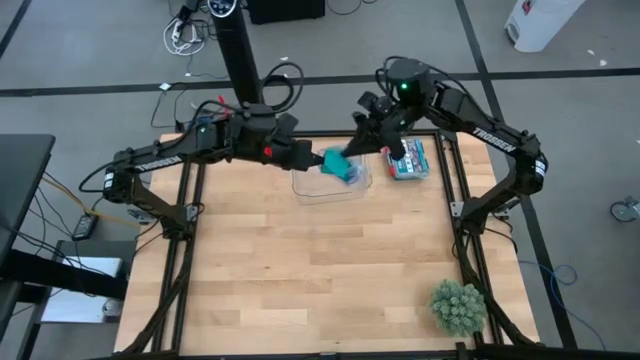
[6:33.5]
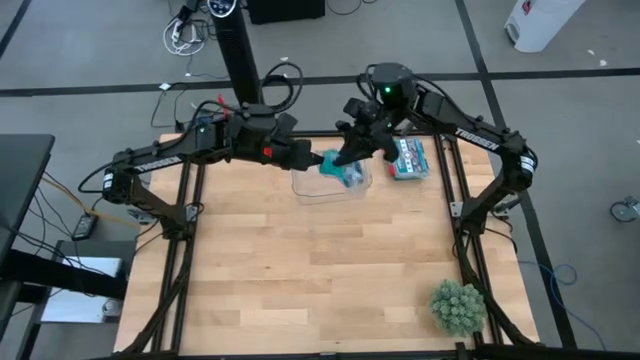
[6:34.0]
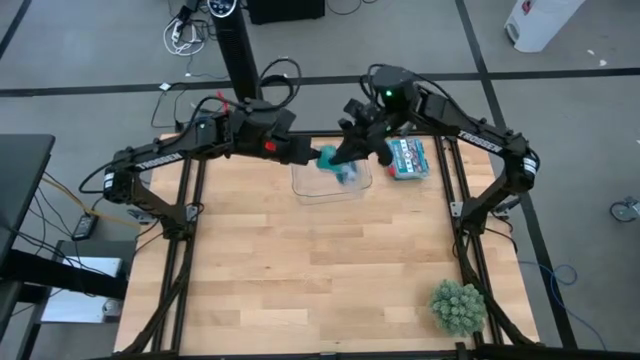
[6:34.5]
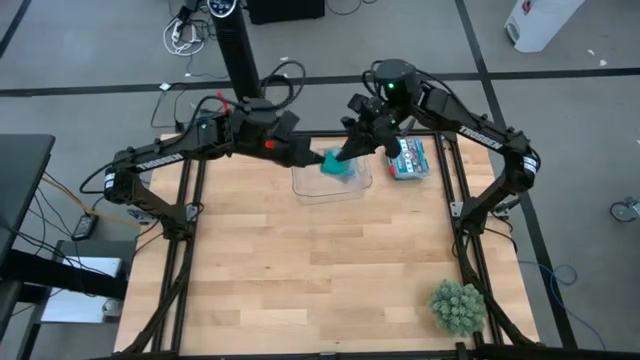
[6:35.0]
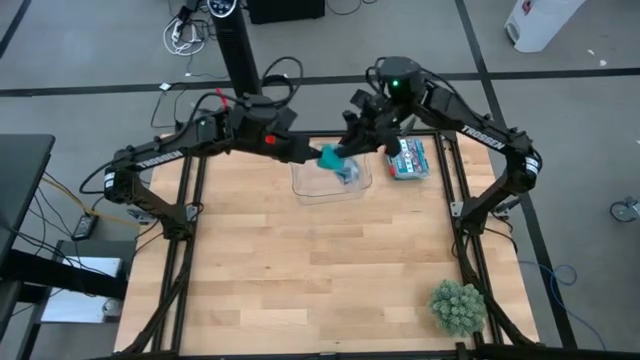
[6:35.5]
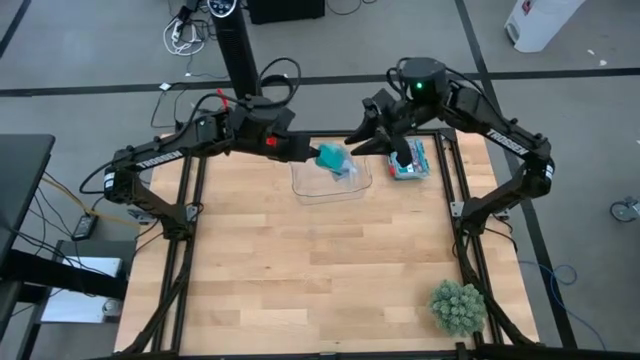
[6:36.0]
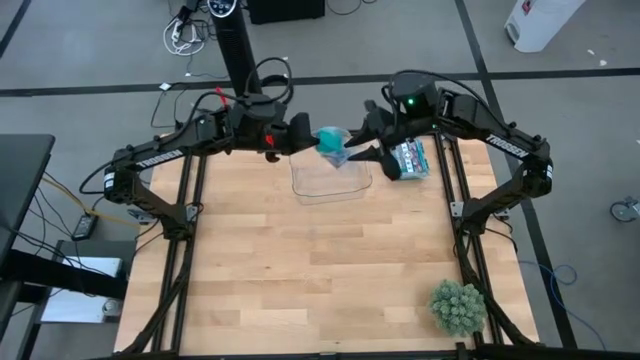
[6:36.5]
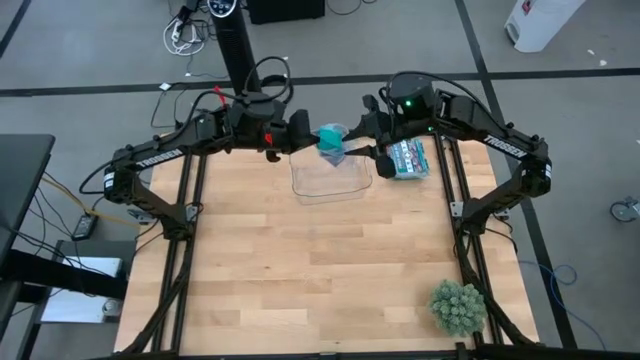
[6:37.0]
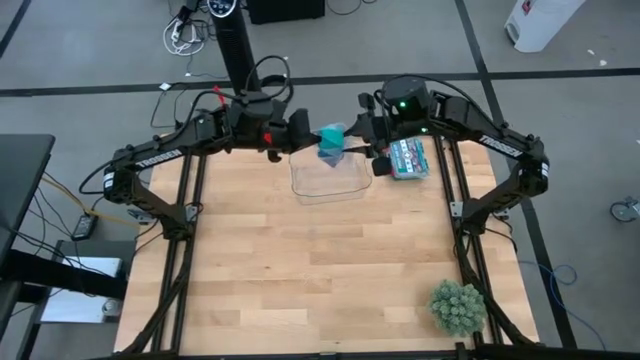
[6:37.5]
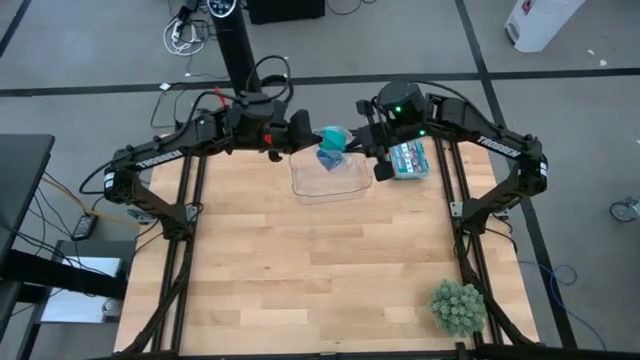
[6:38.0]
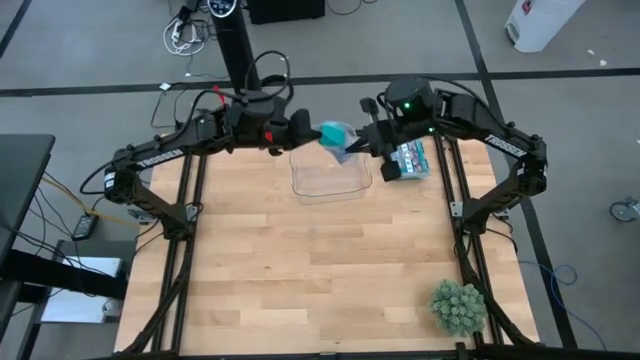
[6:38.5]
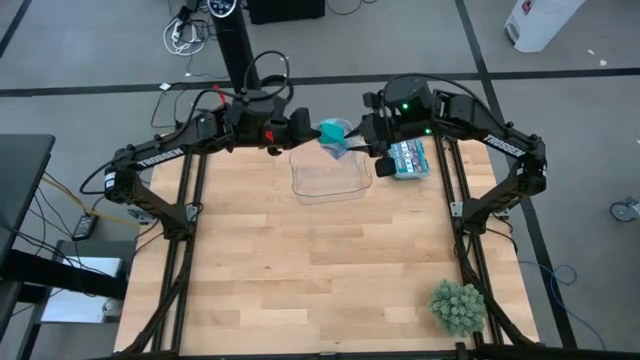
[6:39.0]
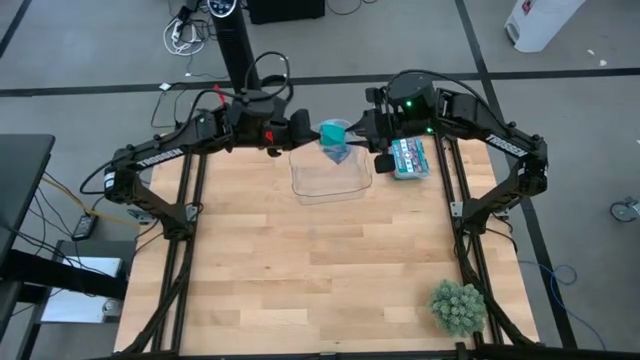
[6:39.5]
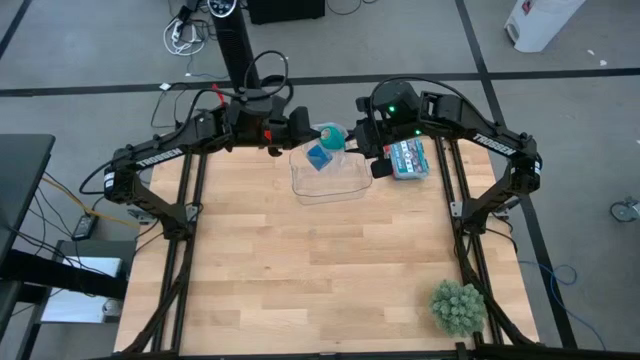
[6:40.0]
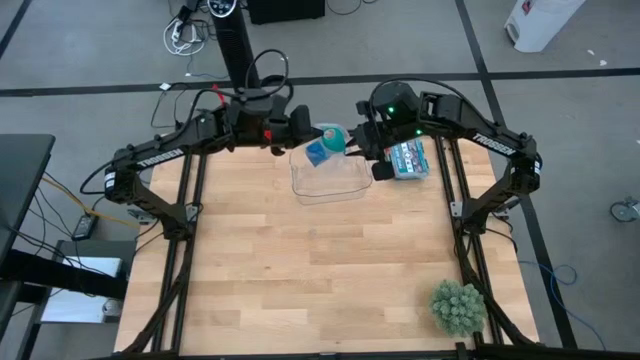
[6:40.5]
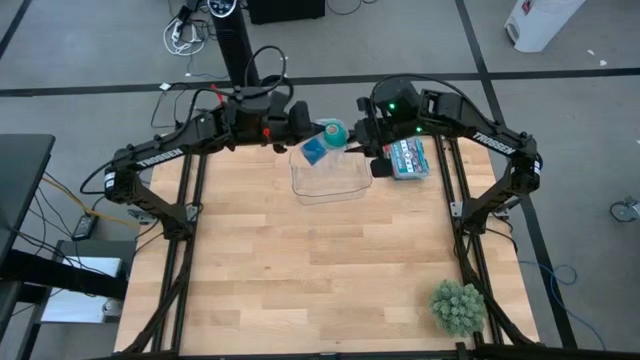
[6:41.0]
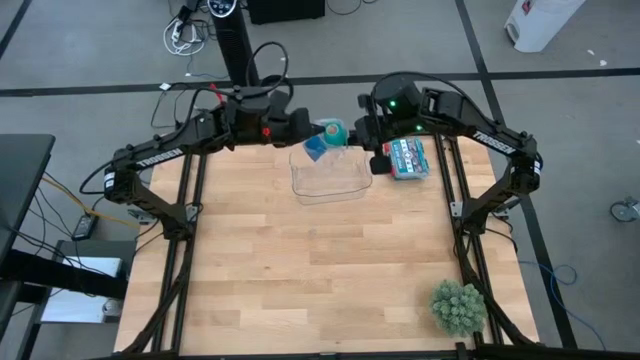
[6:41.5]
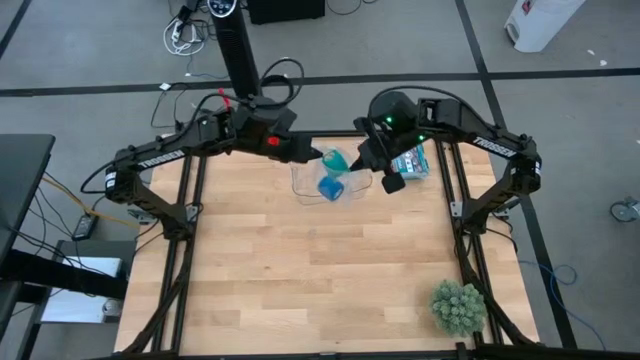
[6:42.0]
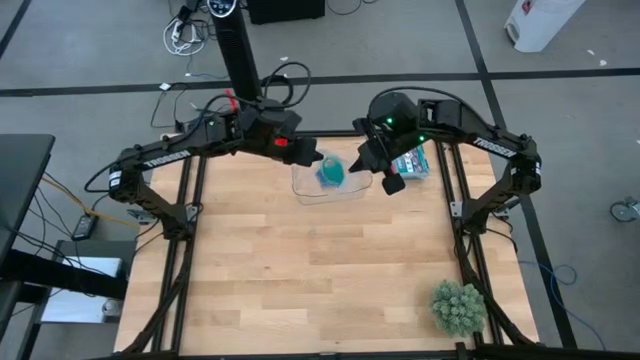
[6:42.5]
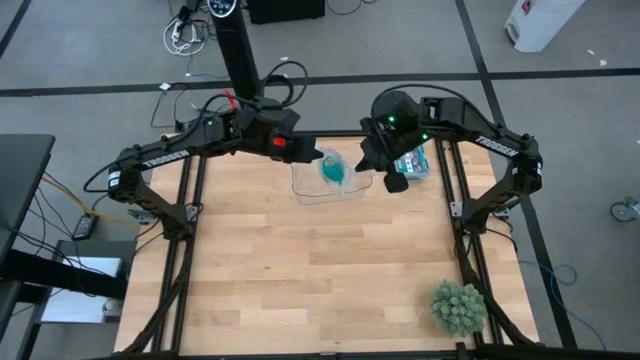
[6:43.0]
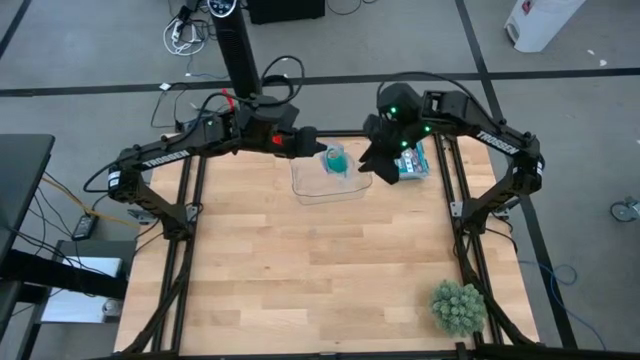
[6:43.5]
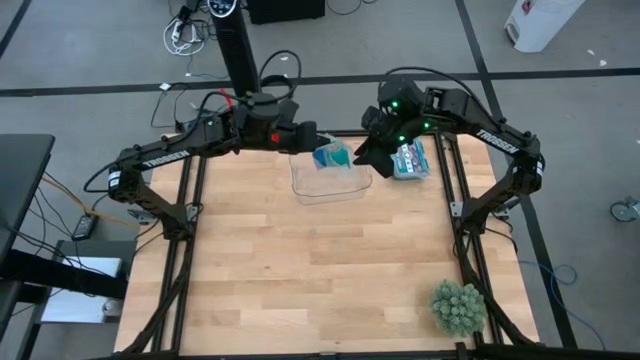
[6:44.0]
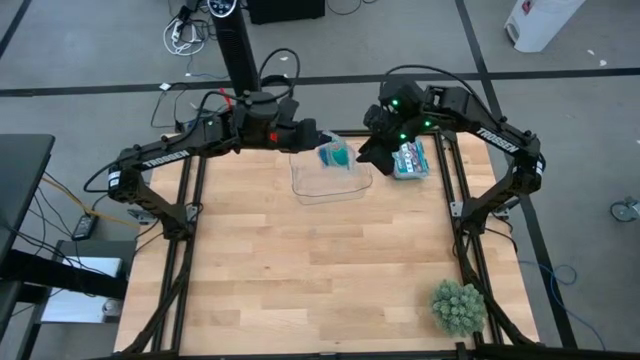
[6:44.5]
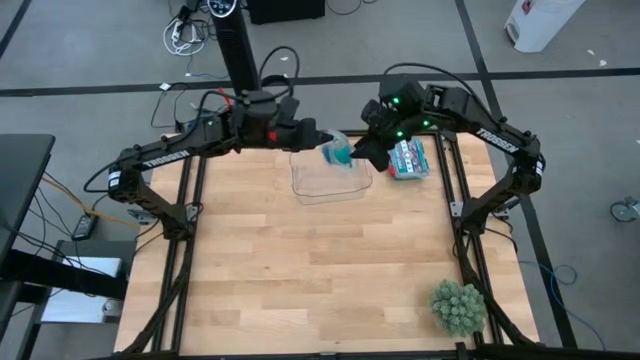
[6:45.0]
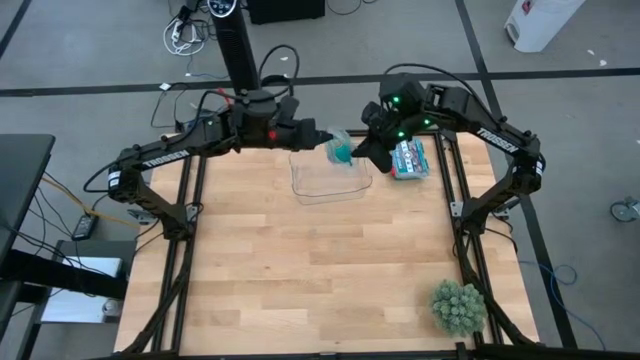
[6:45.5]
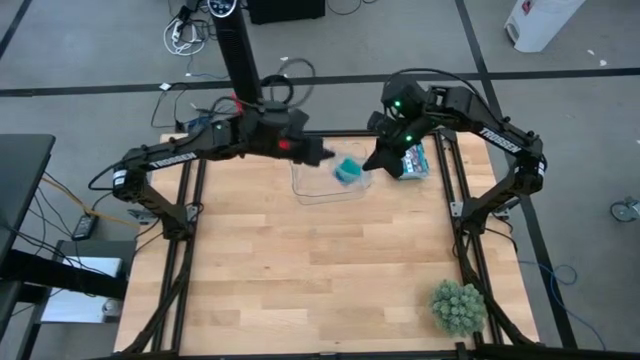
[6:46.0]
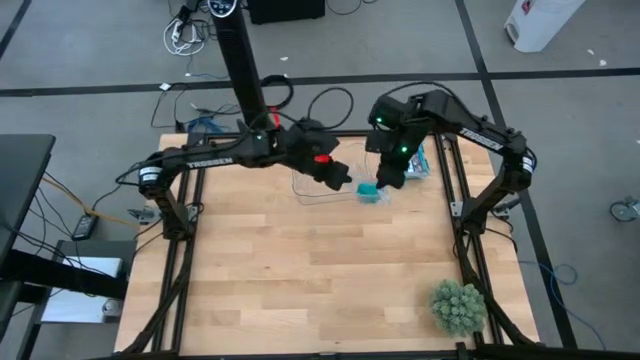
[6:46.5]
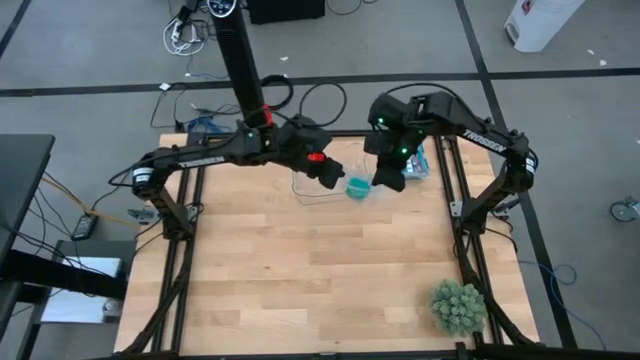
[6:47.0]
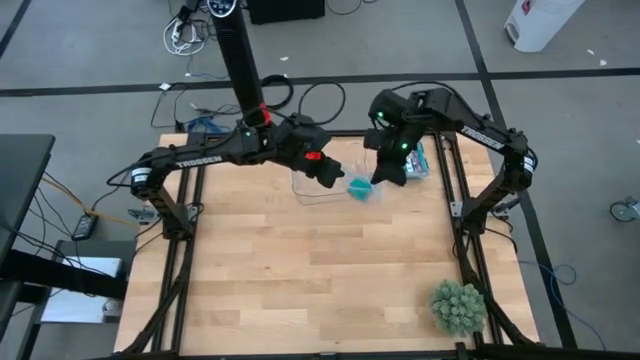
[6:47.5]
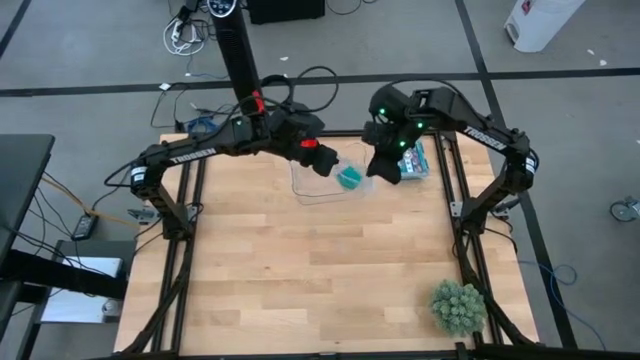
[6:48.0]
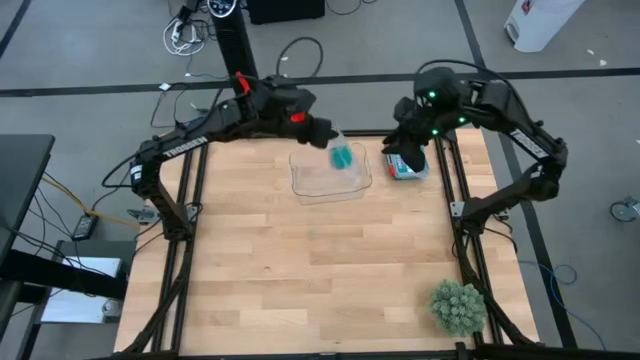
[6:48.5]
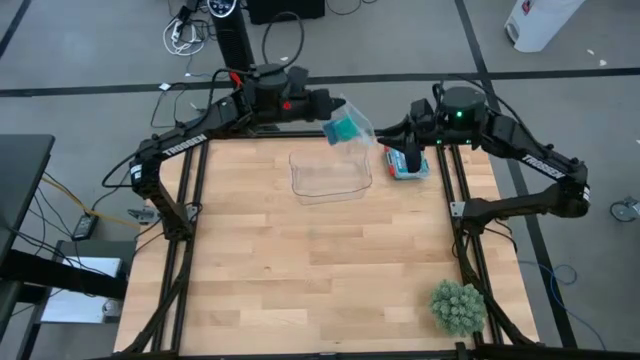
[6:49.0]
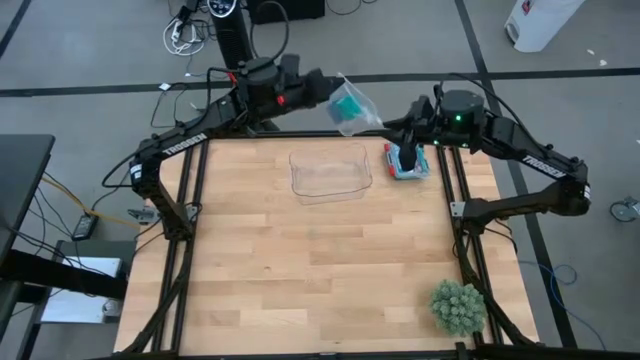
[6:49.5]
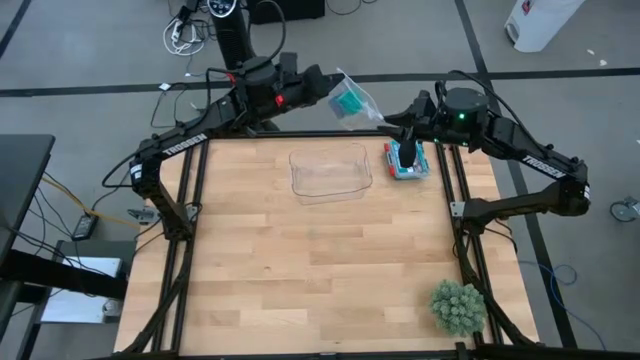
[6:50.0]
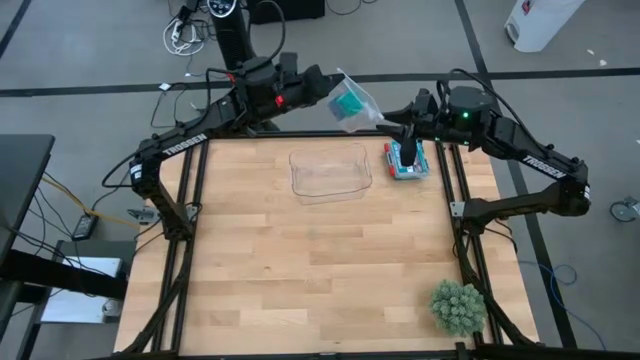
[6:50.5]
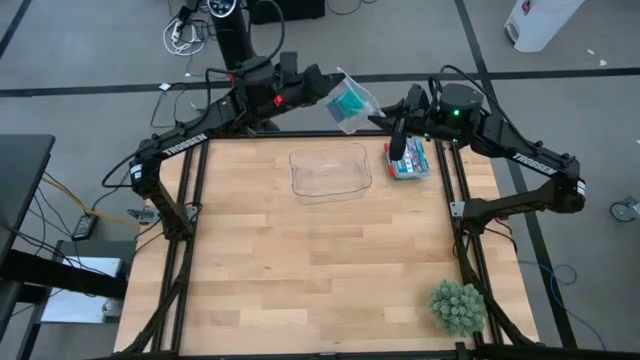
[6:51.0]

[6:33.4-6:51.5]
Task: Roll bandage
Put the sky blue bandage into the transparent zip bag

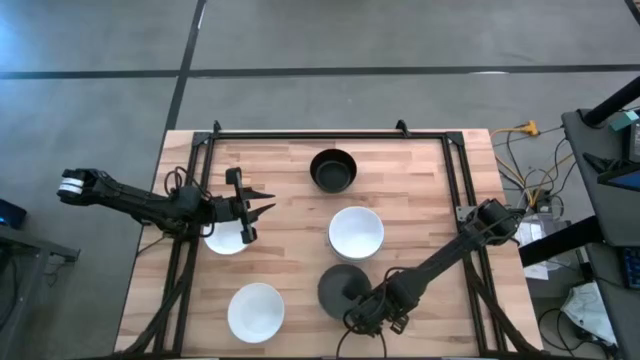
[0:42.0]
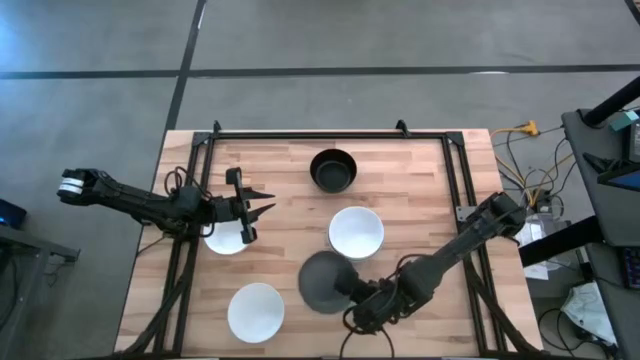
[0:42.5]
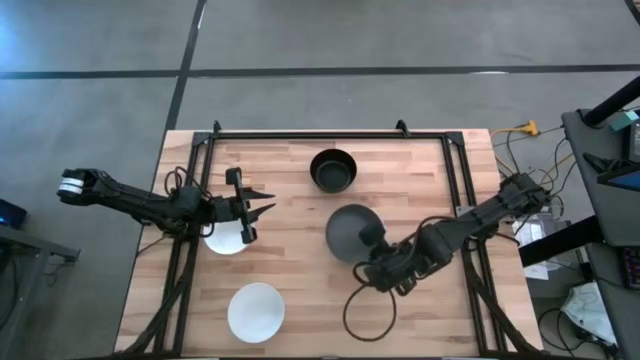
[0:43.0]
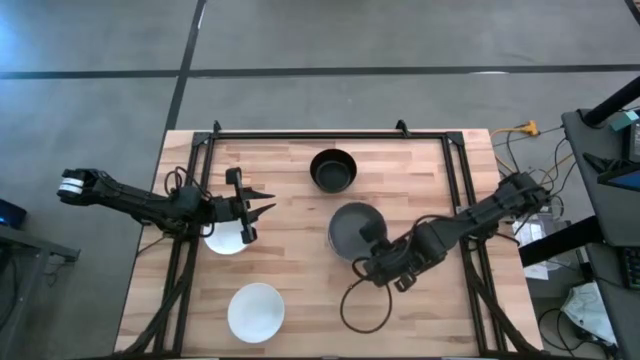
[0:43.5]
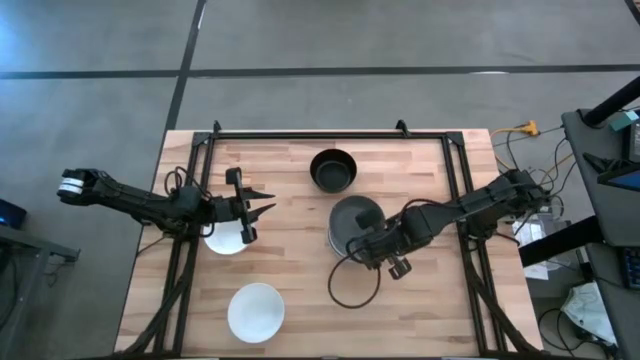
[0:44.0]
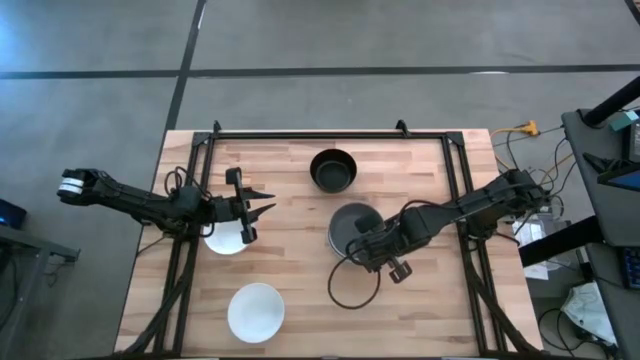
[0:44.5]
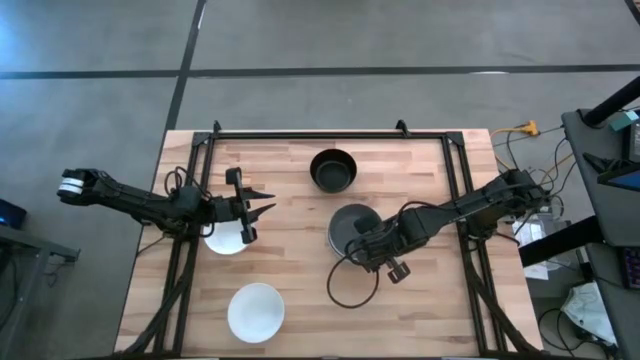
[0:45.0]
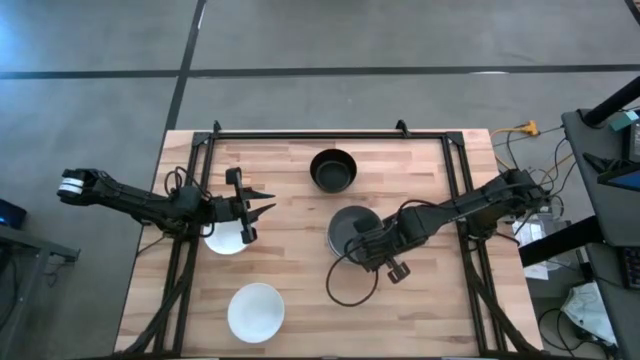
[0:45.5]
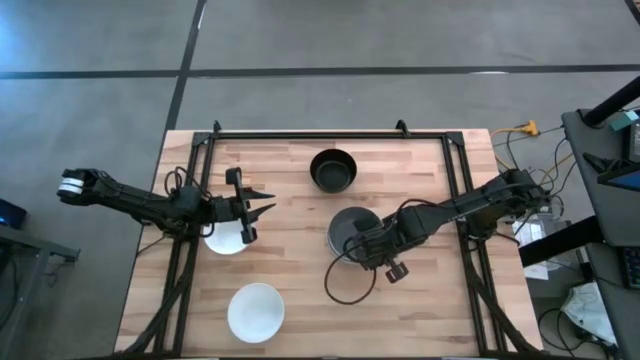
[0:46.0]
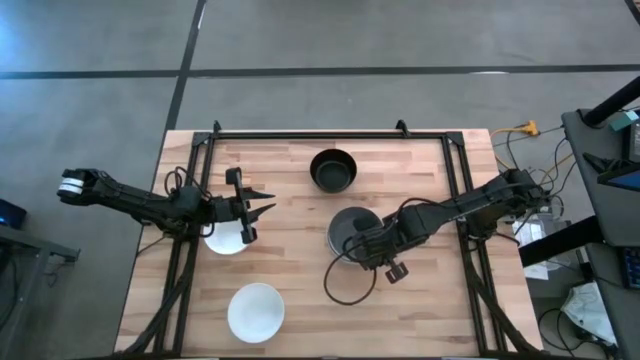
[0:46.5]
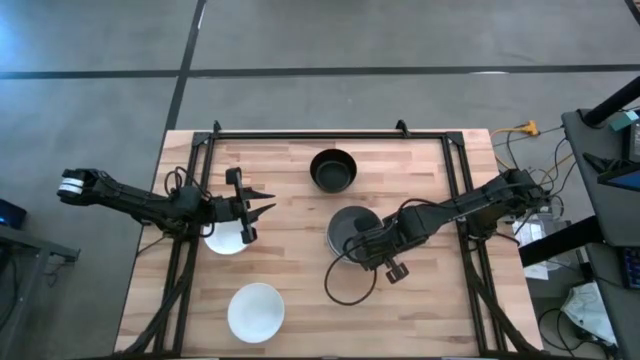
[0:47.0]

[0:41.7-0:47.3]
Task: Nest bowls inside each other
Stack the green bowl on top of the white bowl
